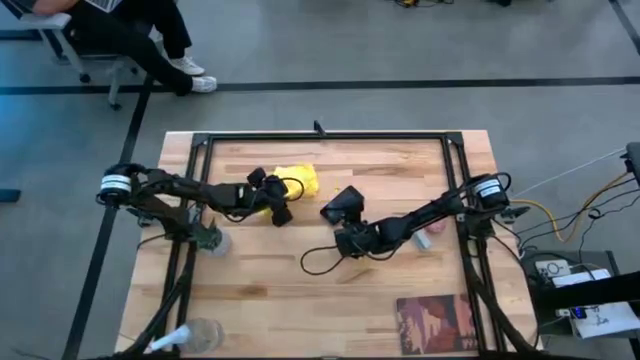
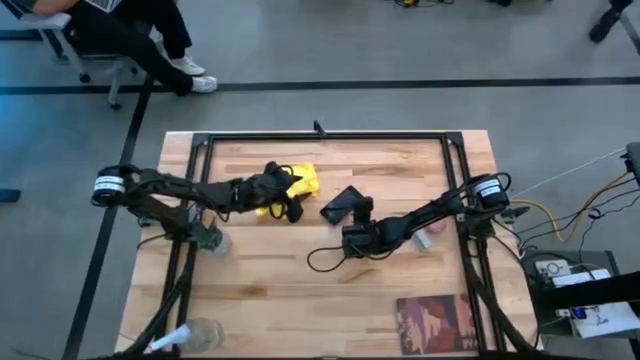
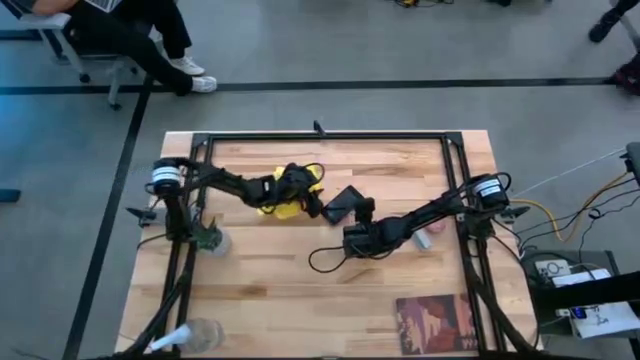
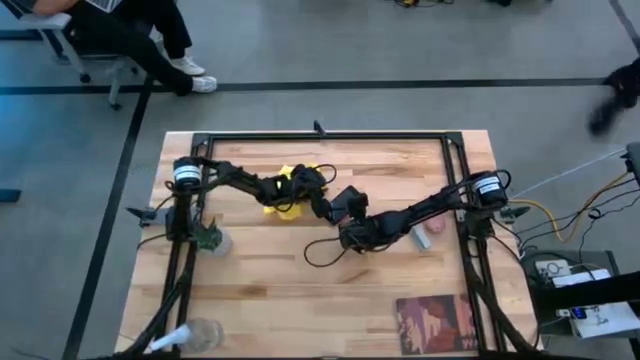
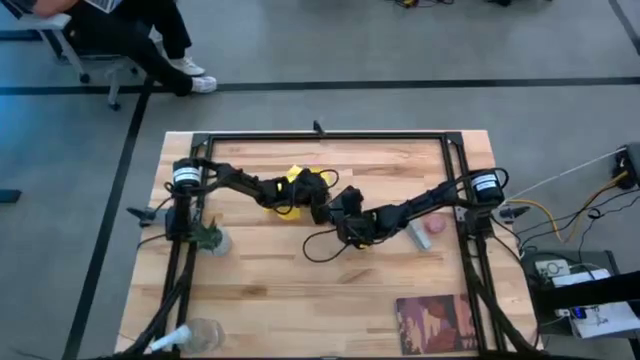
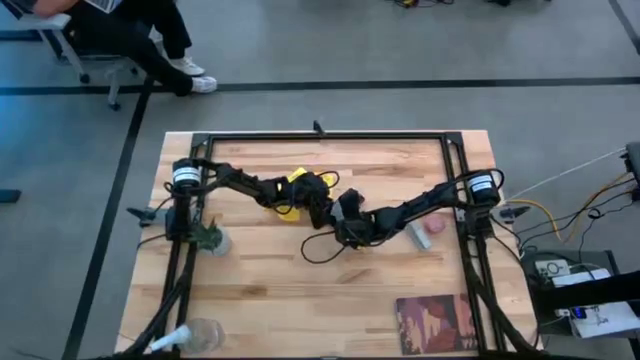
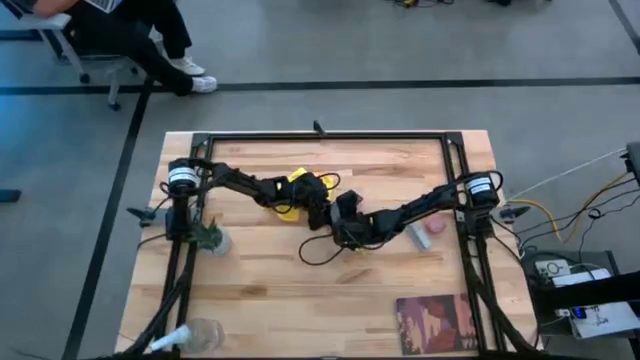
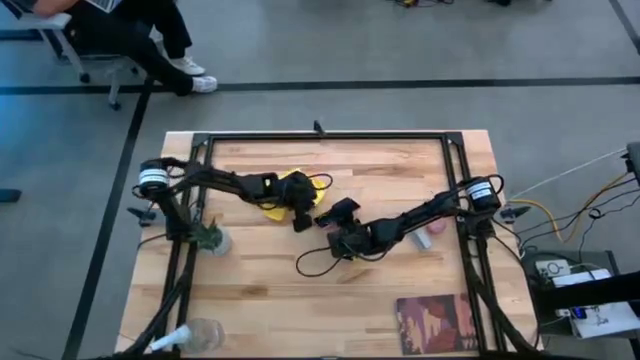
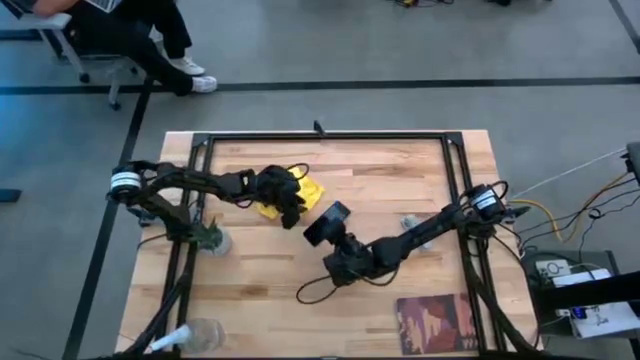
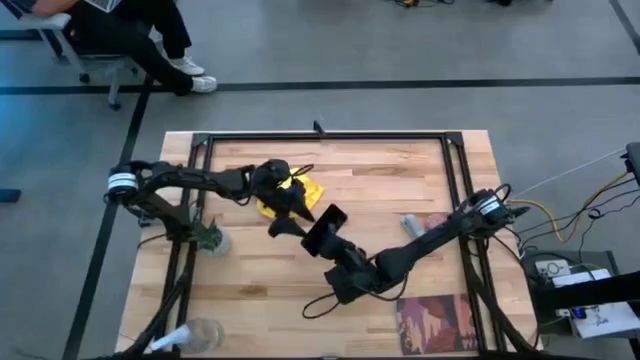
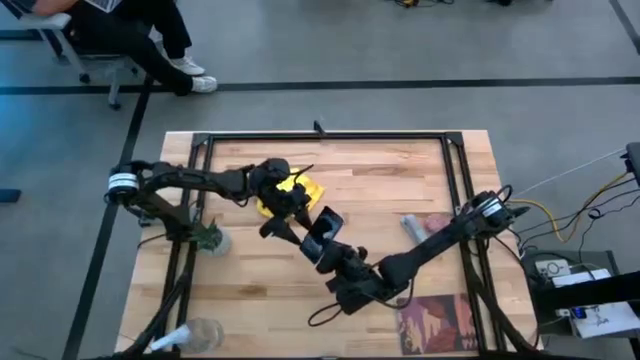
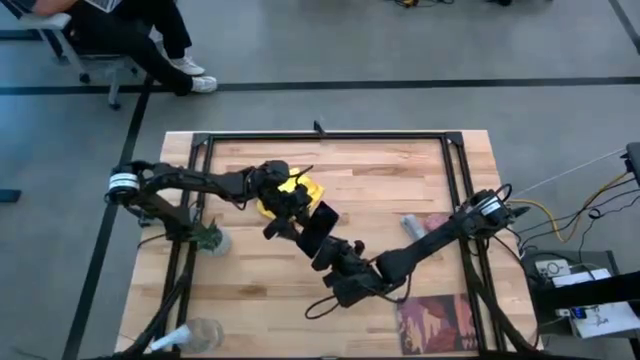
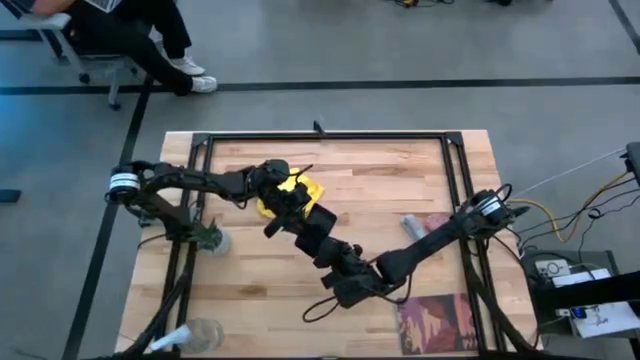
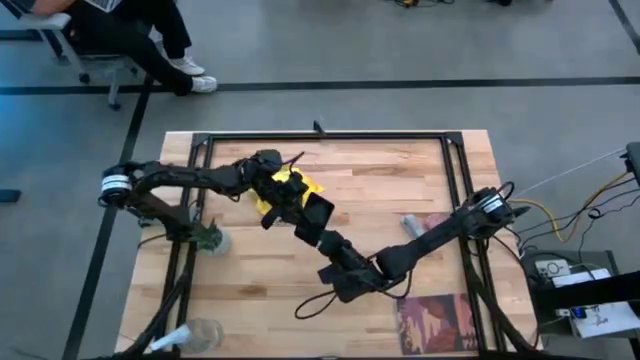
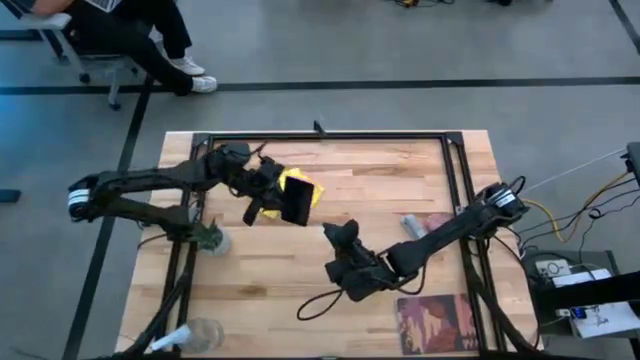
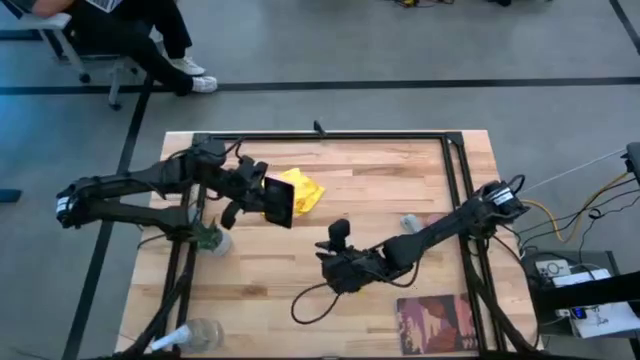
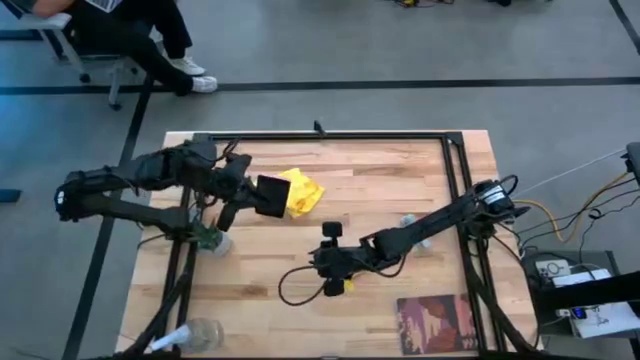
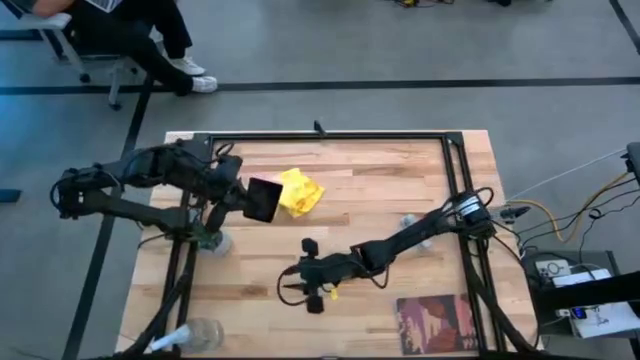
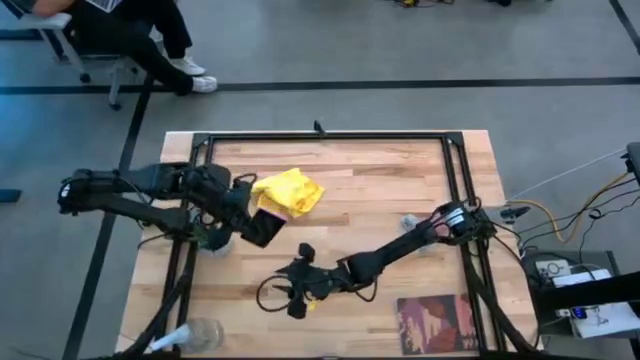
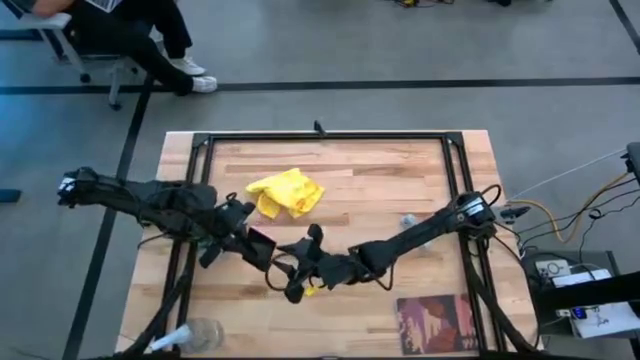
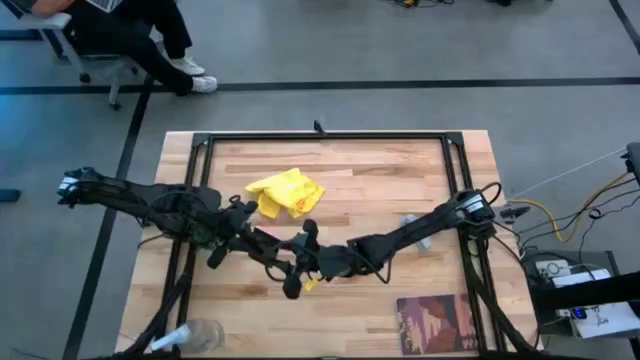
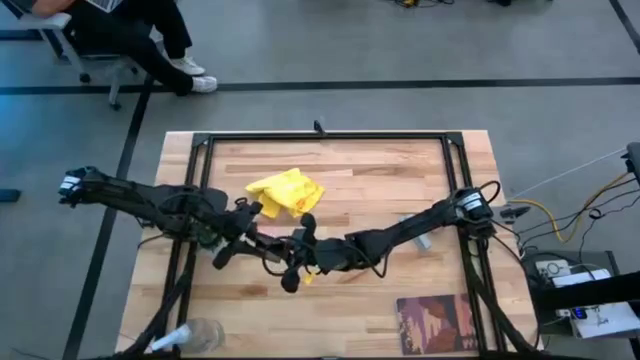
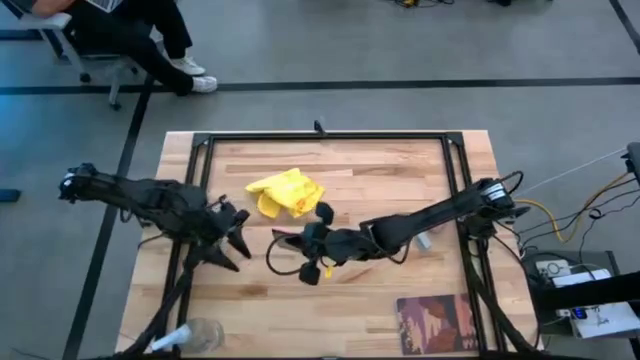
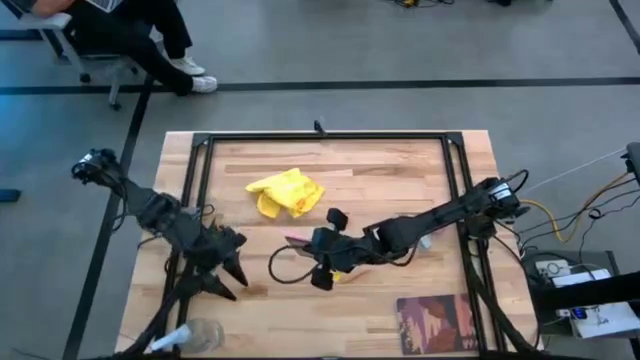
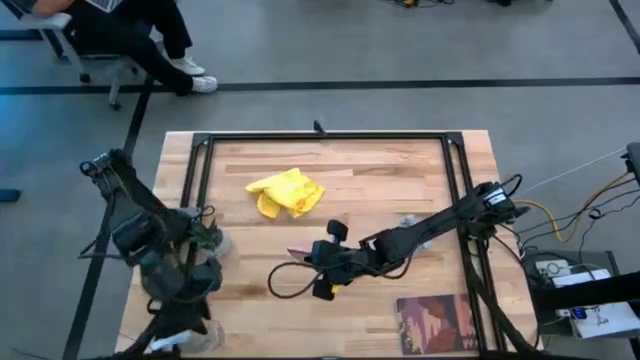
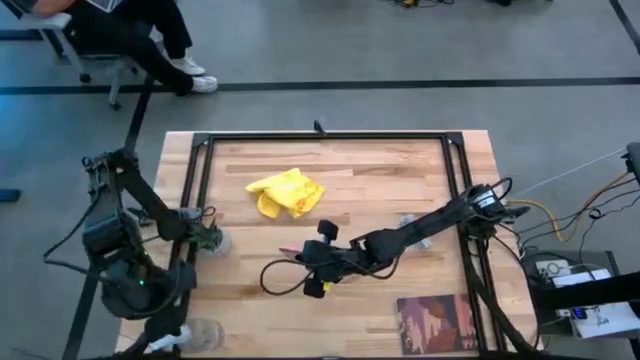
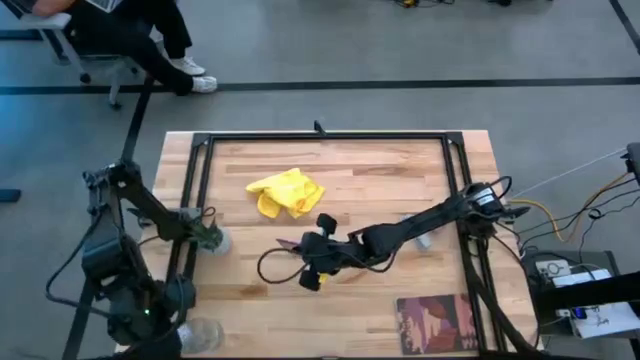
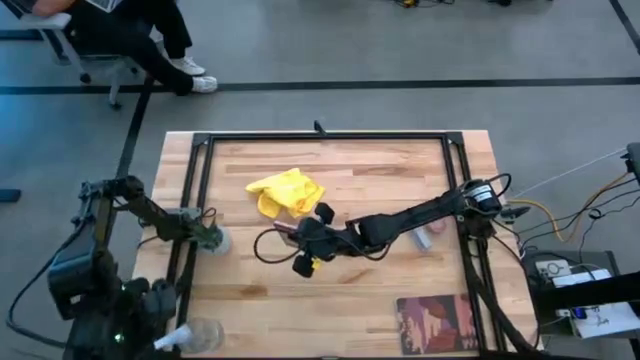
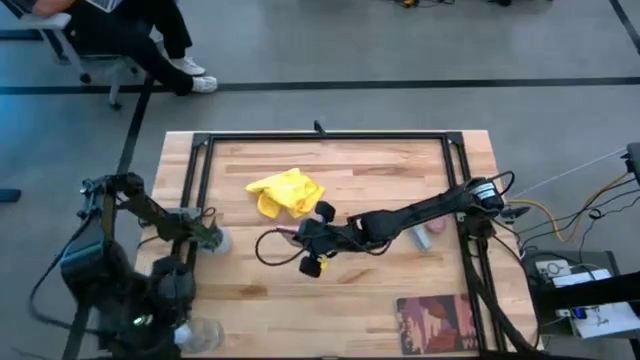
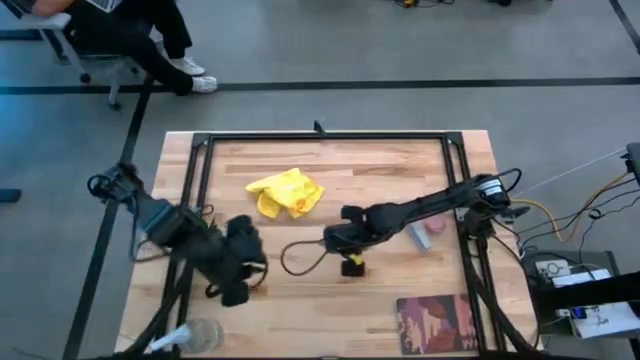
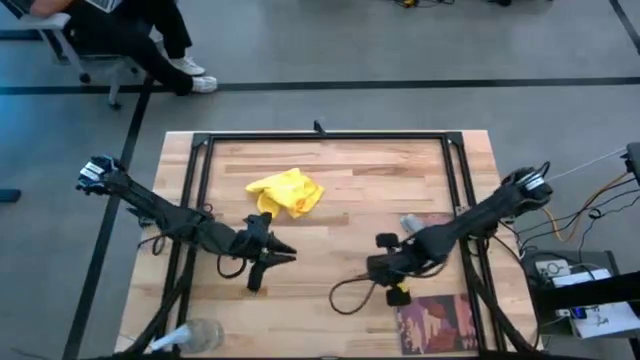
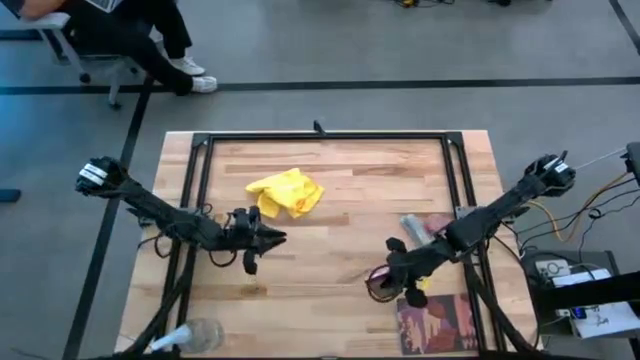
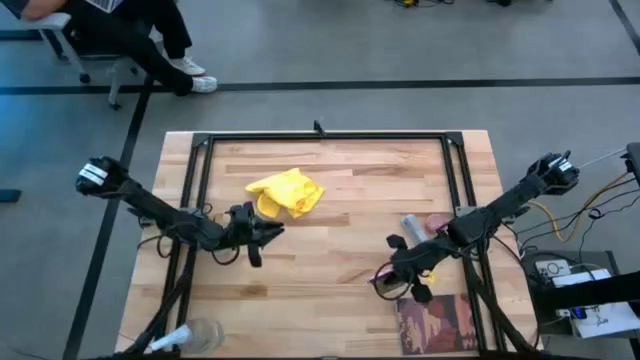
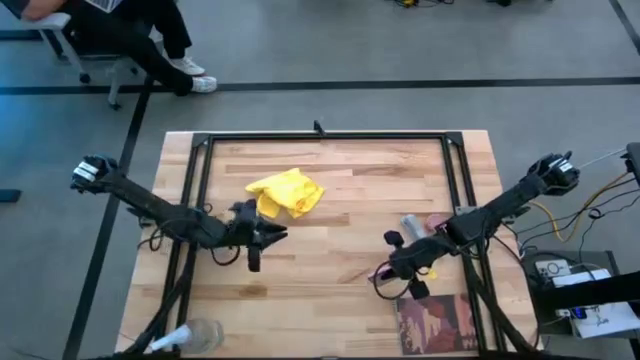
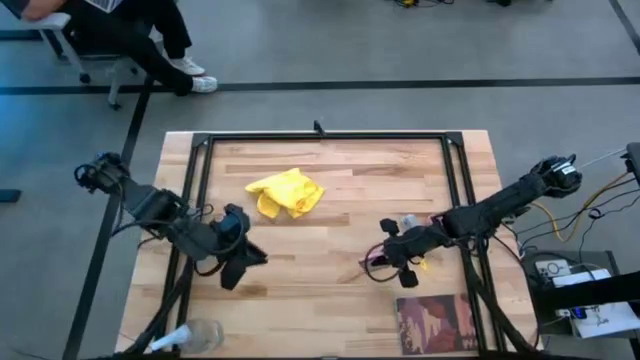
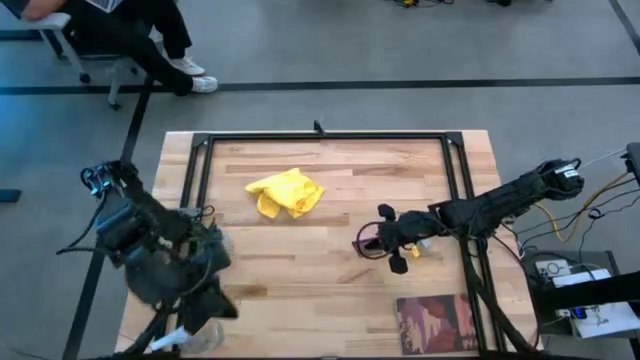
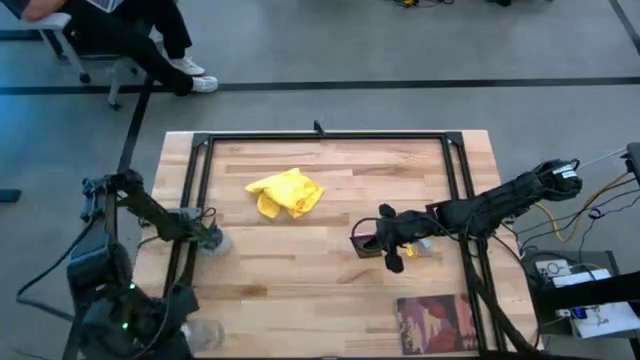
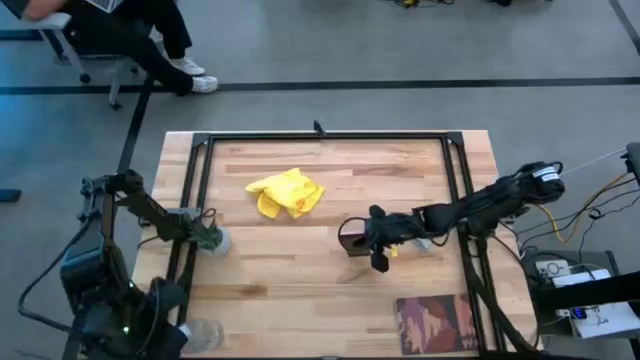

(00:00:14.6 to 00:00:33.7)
Task: Apply microfiber cloth
Spray the front and back of the cellphone using the spray bottle
